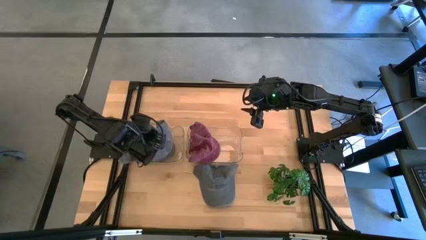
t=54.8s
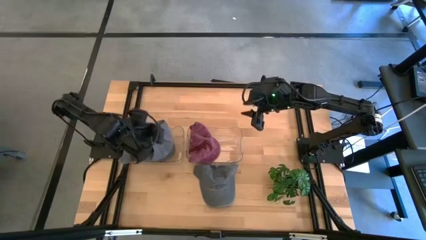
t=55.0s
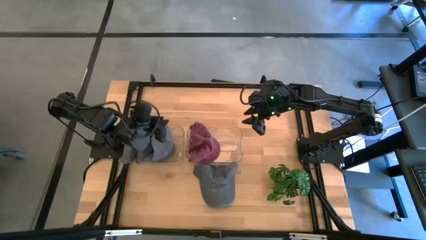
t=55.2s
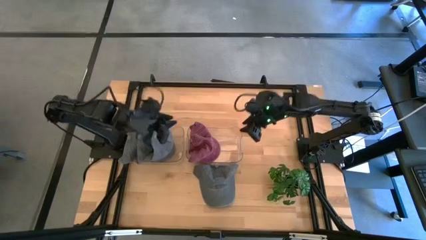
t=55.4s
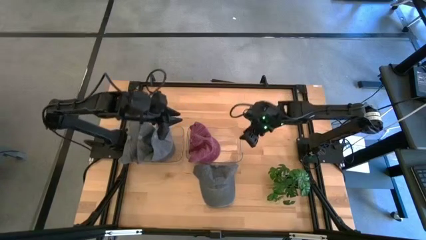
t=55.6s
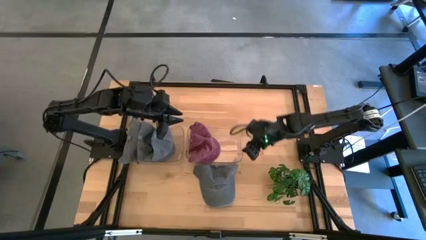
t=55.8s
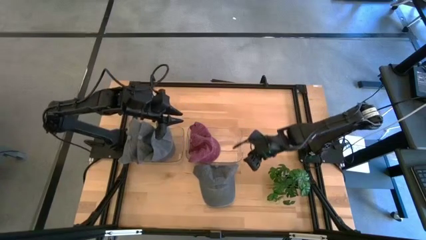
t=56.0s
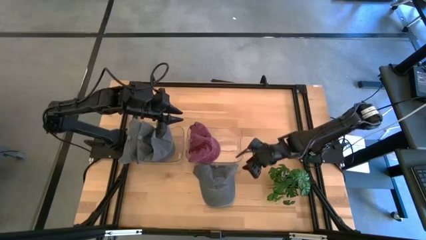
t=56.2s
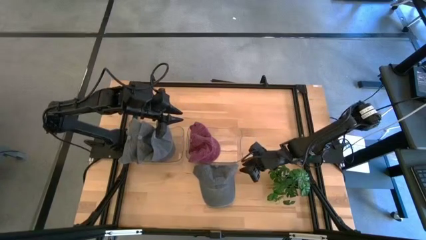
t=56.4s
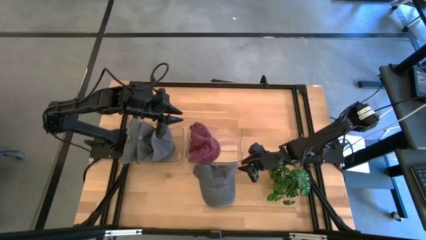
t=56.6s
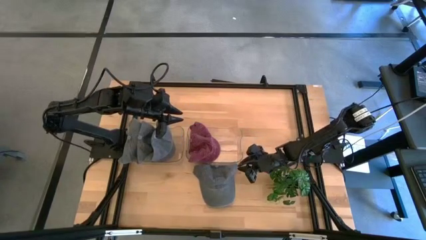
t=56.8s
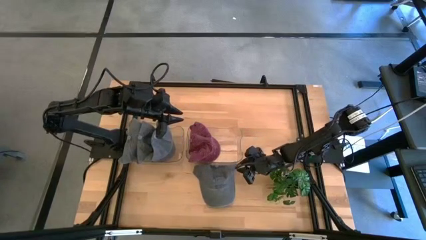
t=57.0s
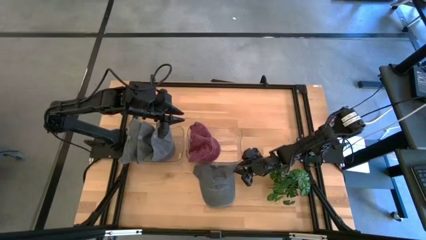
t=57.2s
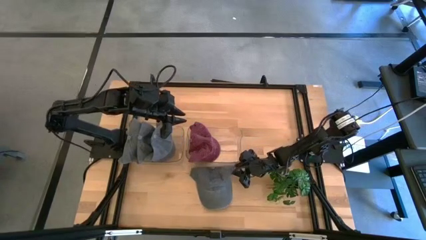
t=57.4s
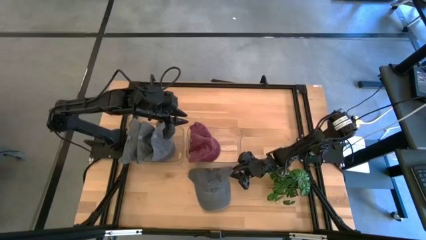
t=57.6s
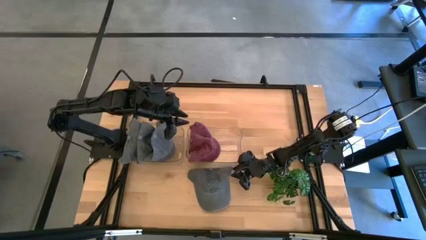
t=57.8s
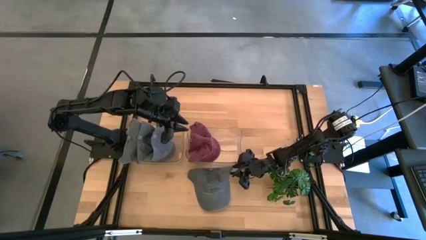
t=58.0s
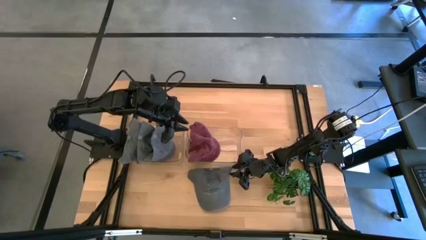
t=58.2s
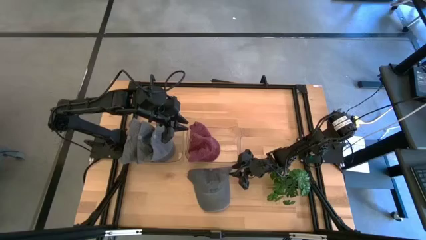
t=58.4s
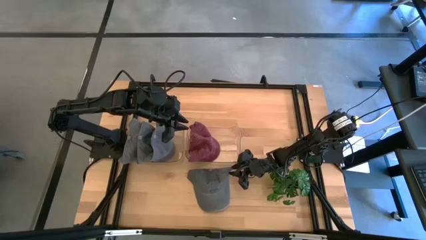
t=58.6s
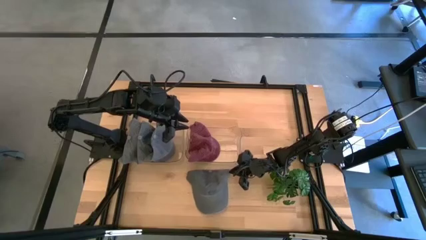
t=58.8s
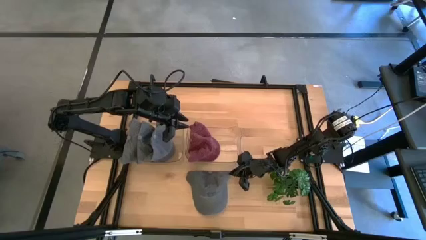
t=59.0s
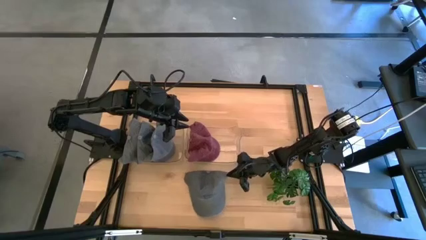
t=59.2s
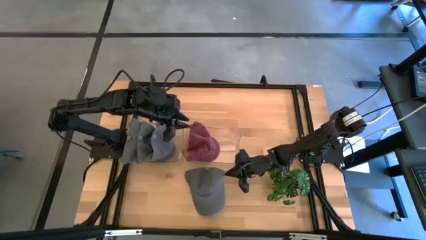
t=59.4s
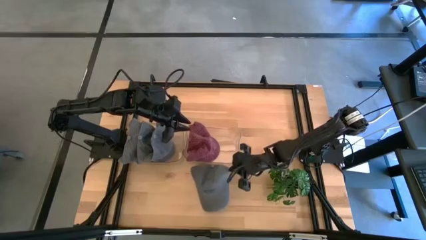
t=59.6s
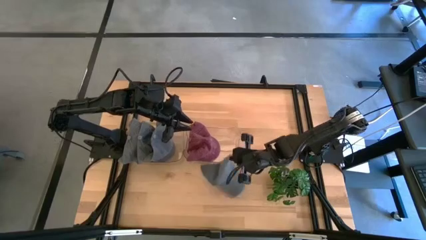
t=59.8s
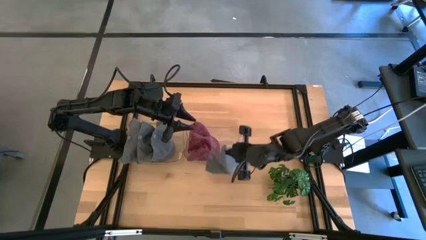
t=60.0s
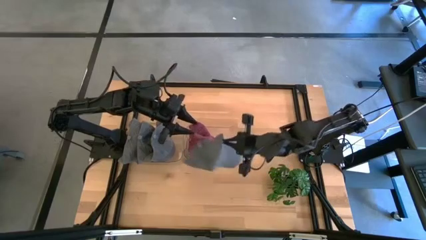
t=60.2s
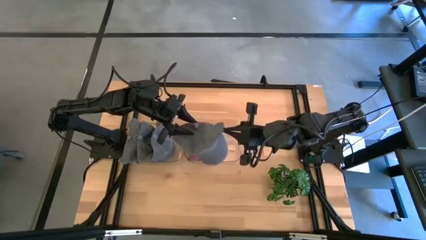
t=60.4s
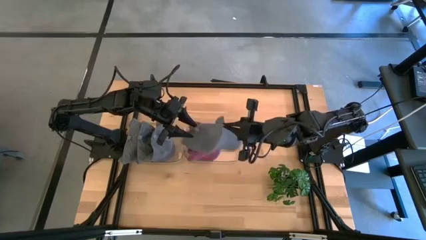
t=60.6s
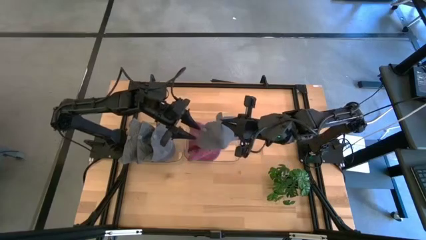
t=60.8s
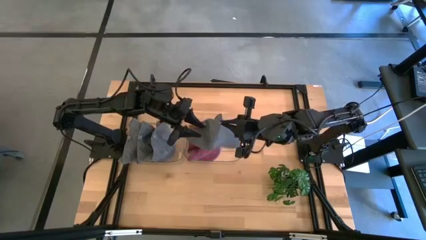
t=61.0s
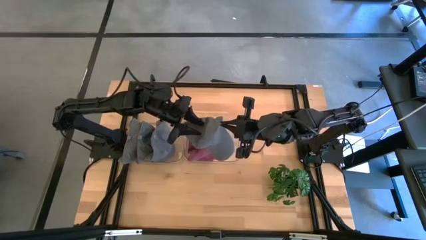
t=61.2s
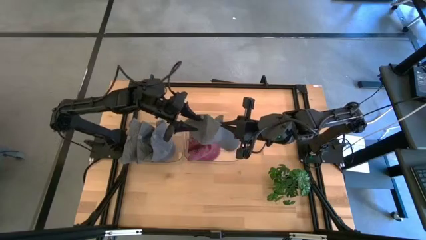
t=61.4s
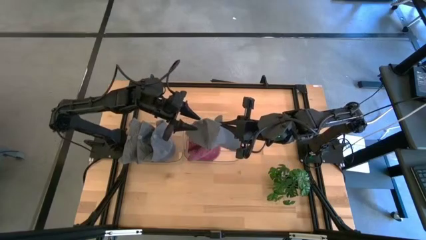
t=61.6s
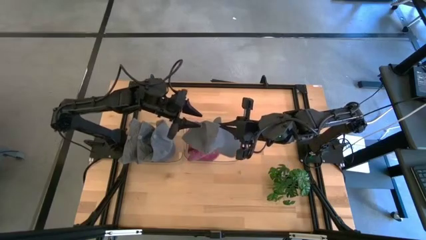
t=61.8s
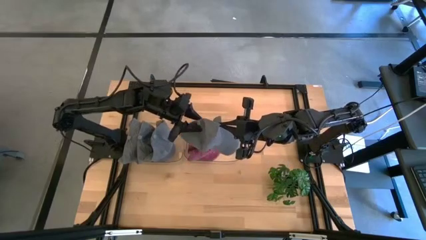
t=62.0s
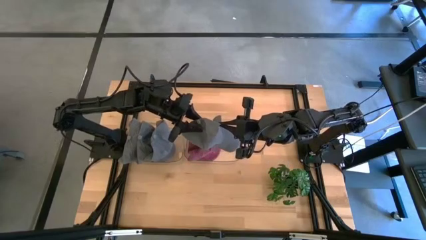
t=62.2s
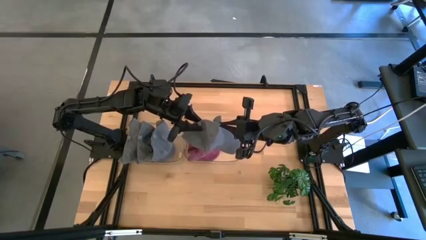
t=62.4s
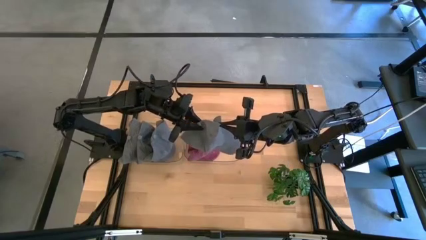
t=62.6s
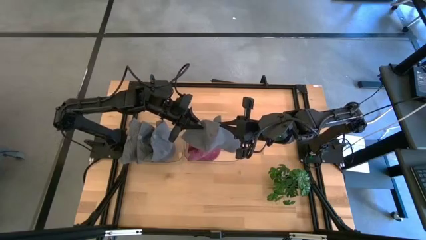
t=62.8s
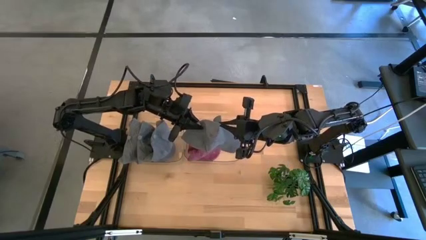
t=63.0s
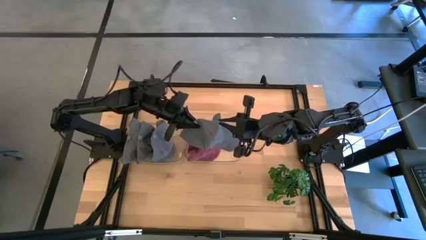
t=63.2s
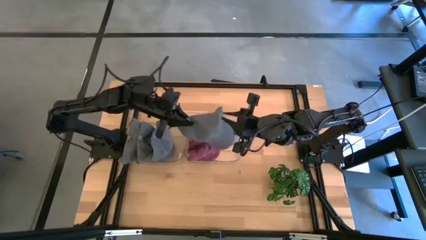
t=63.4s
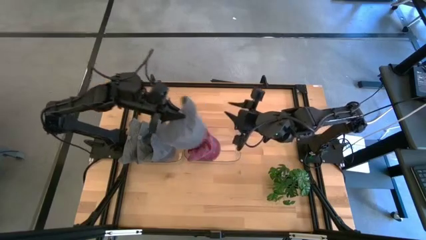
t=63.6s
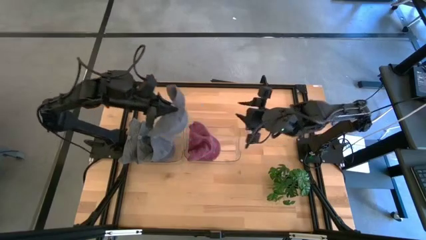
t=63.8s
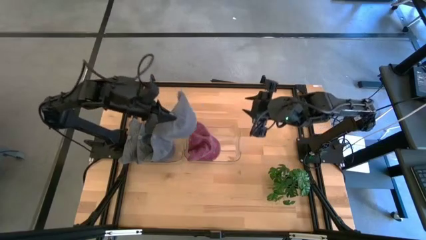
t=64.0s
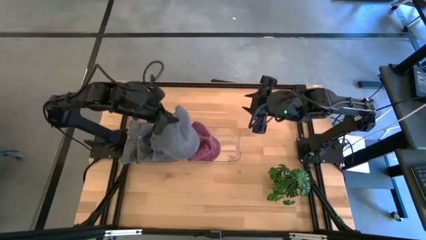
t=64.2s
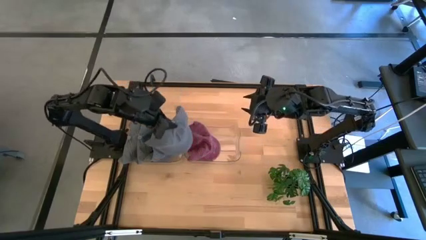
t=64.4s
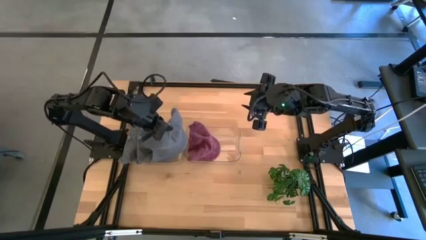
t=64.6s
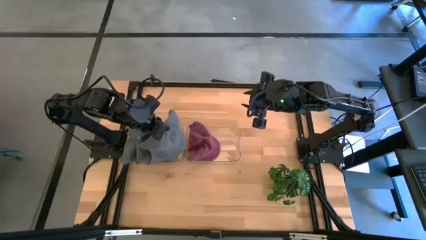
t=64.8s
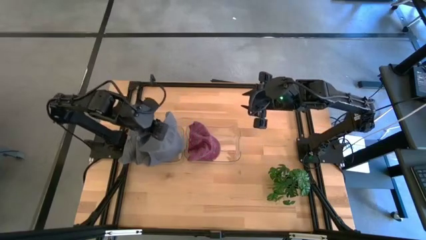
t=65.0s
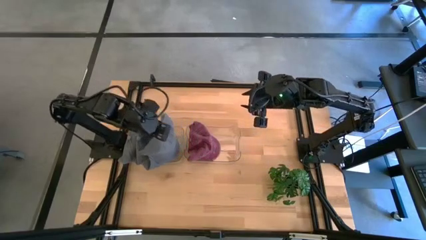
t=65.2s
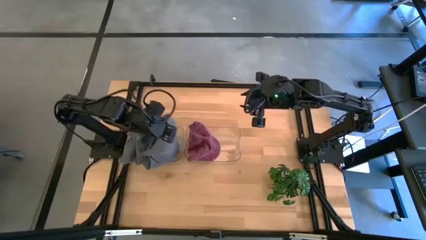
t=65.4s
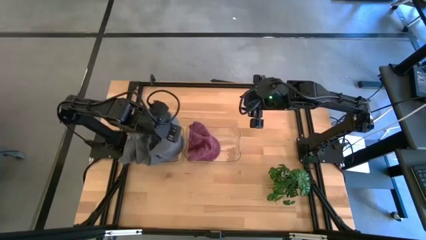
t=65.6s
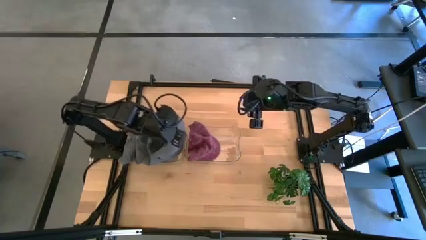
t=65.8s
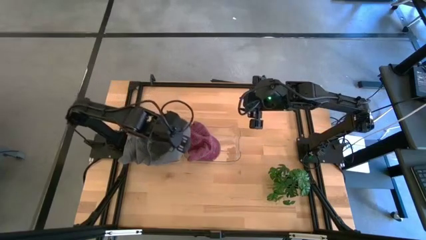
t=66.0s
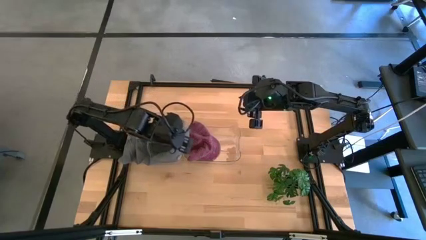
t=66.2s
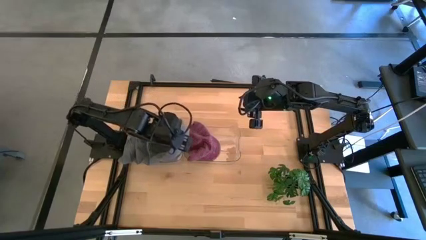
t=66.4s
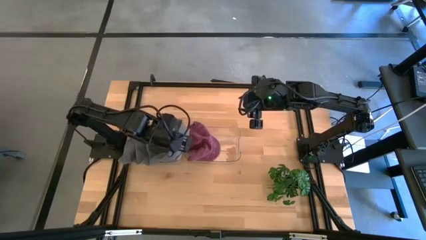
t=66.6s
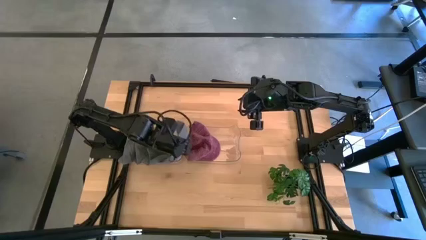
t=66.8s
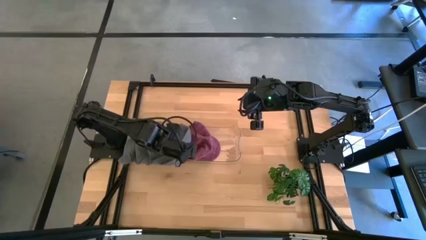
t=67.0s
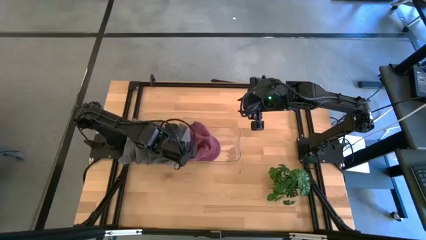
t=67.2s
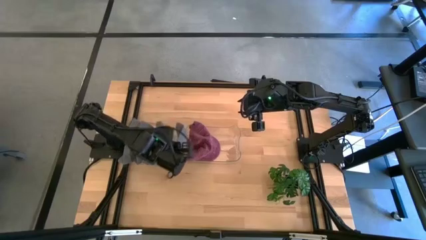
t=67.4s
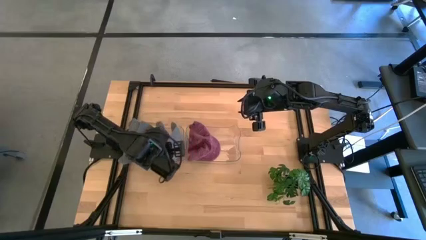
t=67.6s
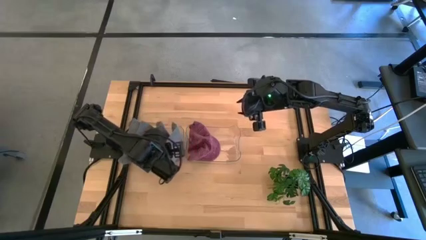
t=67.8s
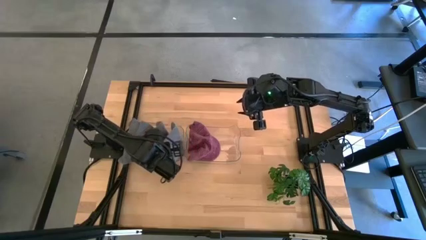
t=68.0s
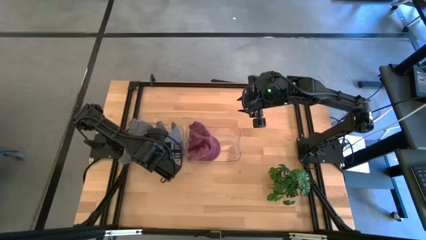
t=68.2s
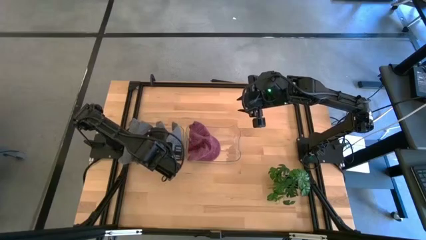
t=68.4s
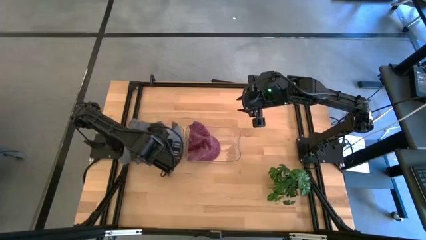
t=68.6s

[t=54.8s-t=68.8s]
Task: Pick & Place hat
Put the dark blue cap into the left transparent bin
